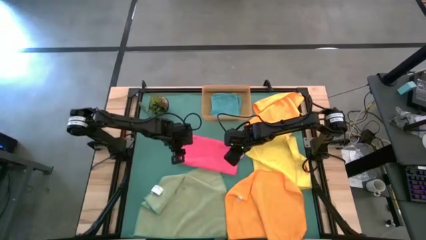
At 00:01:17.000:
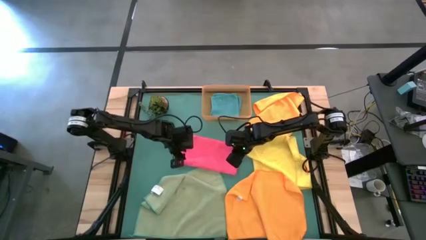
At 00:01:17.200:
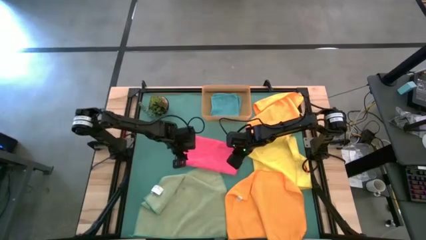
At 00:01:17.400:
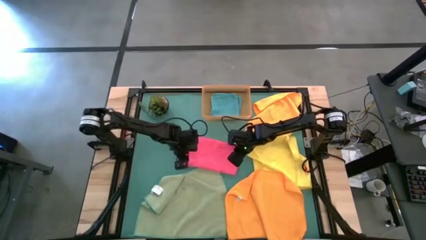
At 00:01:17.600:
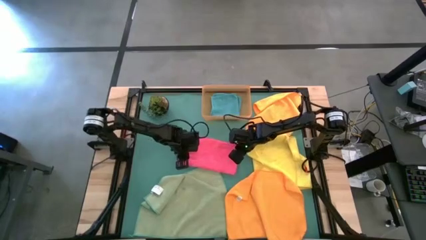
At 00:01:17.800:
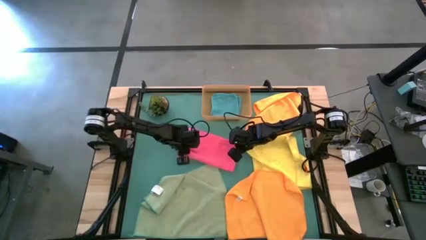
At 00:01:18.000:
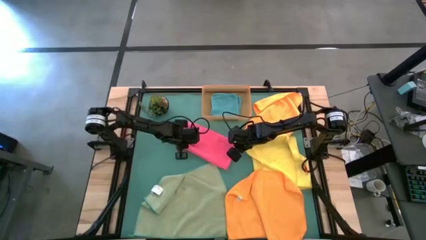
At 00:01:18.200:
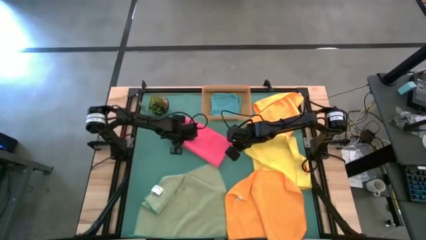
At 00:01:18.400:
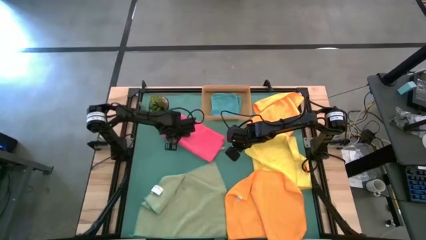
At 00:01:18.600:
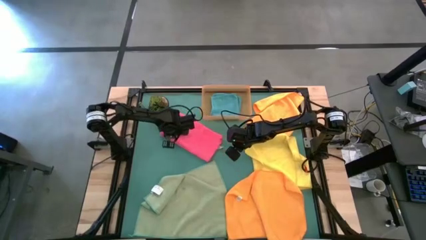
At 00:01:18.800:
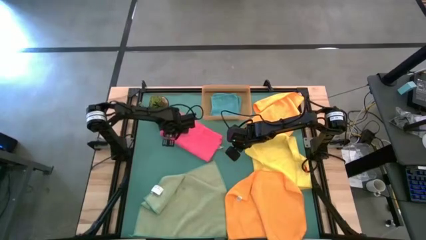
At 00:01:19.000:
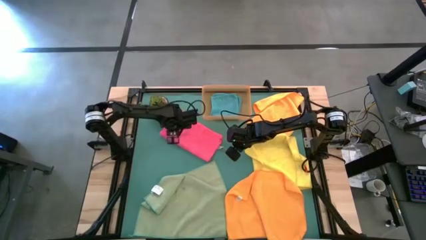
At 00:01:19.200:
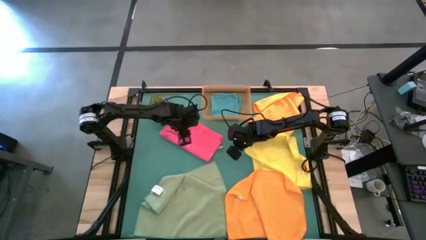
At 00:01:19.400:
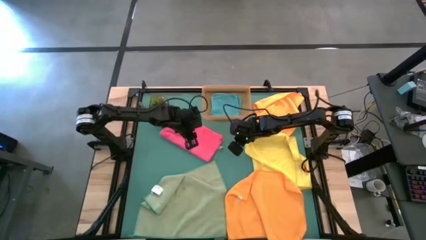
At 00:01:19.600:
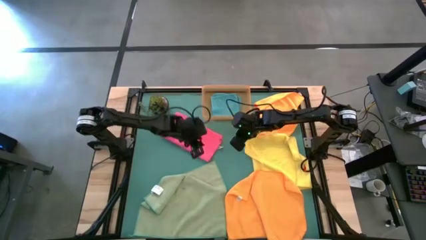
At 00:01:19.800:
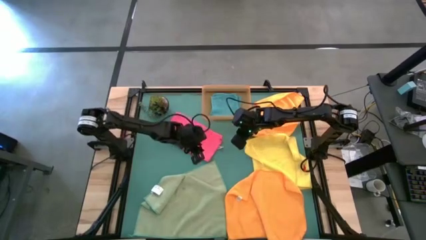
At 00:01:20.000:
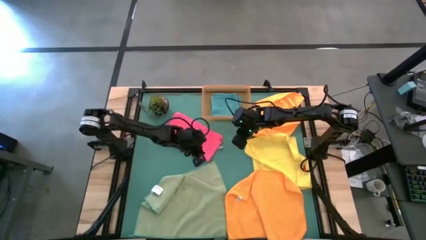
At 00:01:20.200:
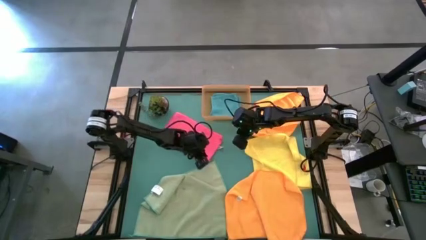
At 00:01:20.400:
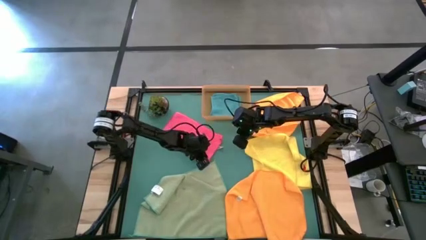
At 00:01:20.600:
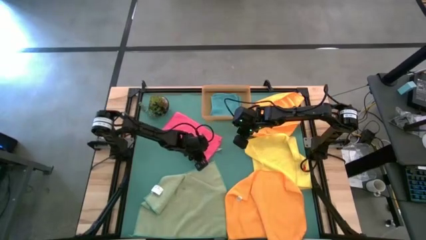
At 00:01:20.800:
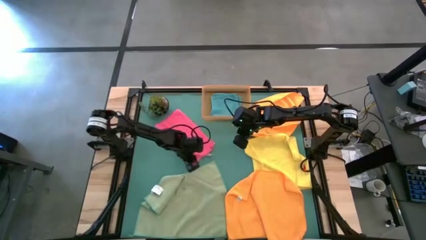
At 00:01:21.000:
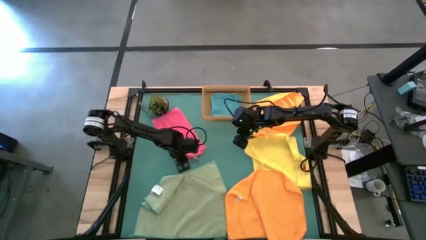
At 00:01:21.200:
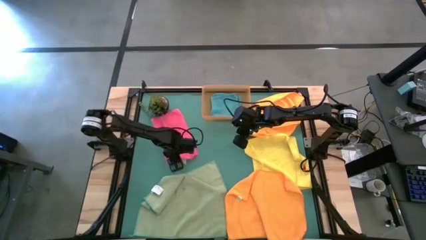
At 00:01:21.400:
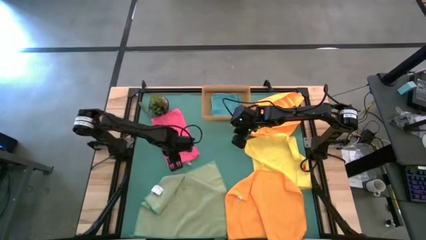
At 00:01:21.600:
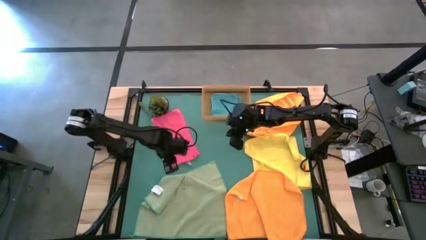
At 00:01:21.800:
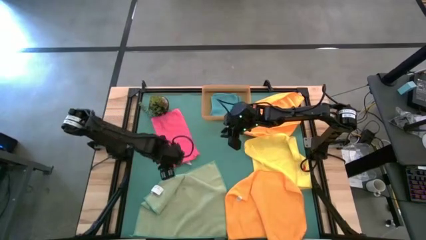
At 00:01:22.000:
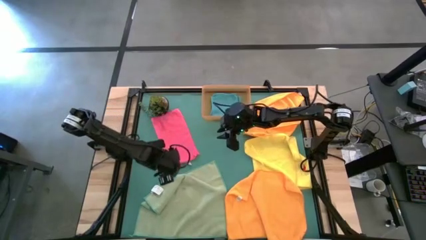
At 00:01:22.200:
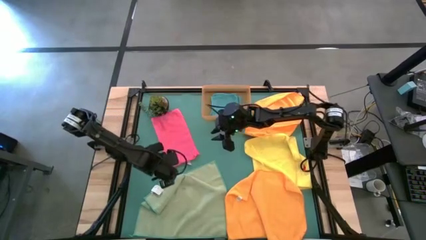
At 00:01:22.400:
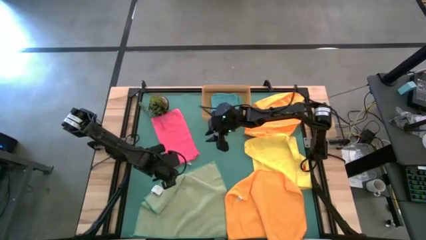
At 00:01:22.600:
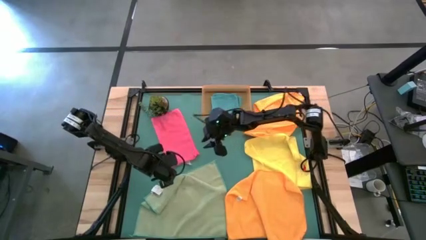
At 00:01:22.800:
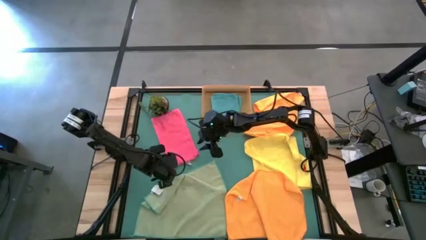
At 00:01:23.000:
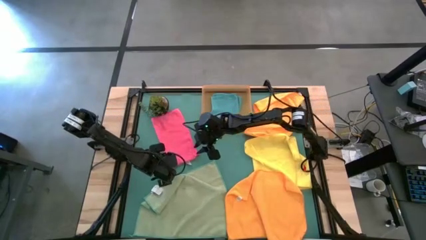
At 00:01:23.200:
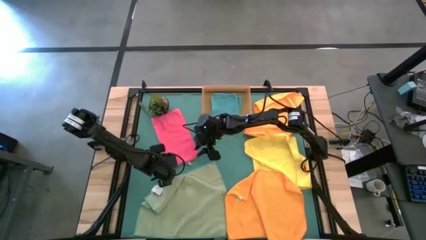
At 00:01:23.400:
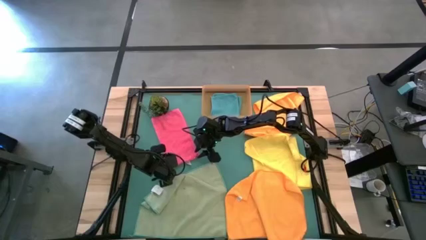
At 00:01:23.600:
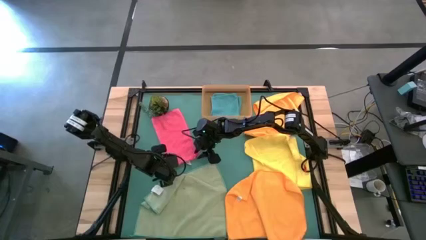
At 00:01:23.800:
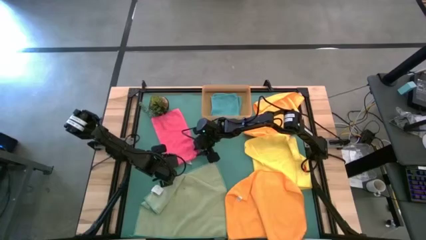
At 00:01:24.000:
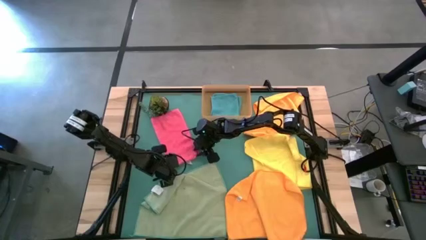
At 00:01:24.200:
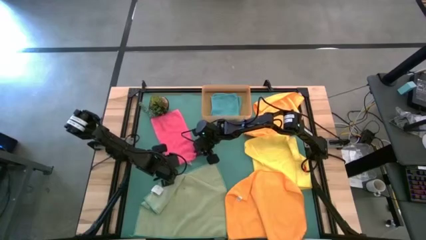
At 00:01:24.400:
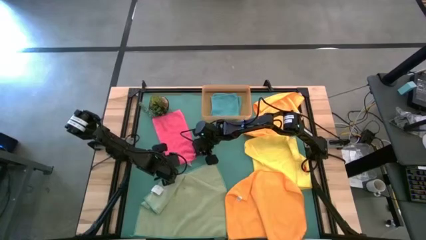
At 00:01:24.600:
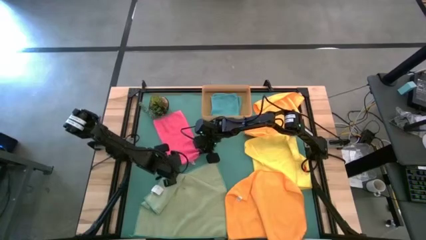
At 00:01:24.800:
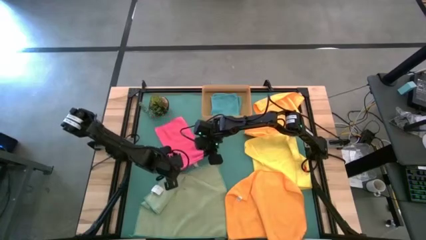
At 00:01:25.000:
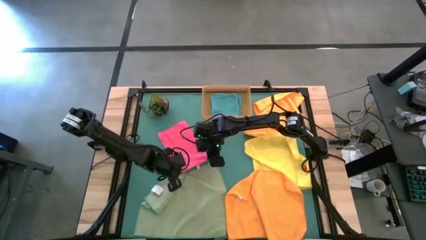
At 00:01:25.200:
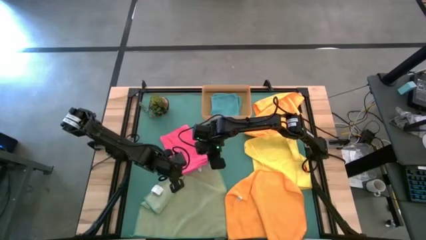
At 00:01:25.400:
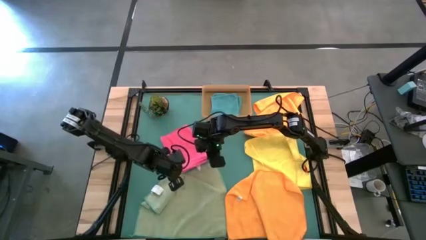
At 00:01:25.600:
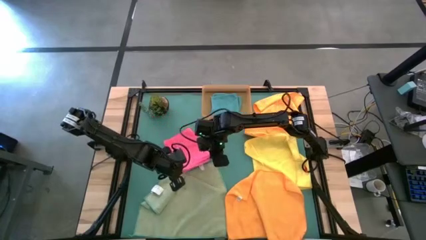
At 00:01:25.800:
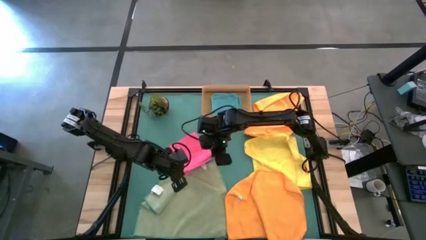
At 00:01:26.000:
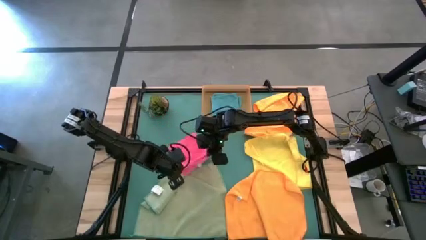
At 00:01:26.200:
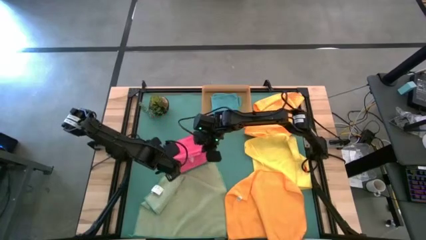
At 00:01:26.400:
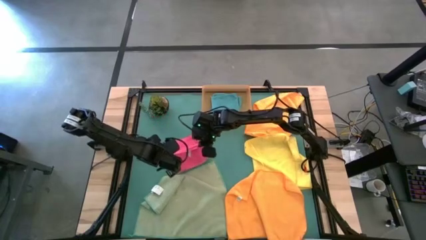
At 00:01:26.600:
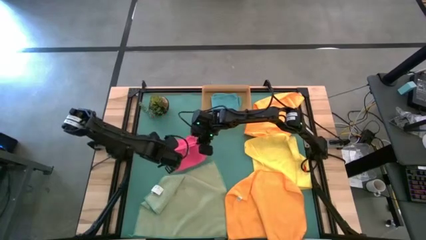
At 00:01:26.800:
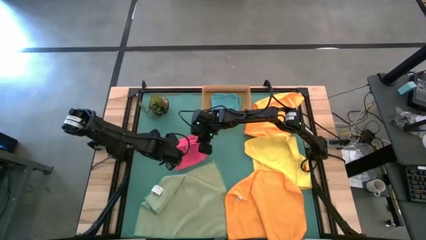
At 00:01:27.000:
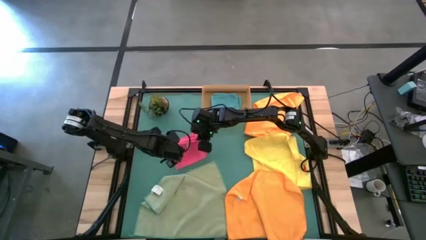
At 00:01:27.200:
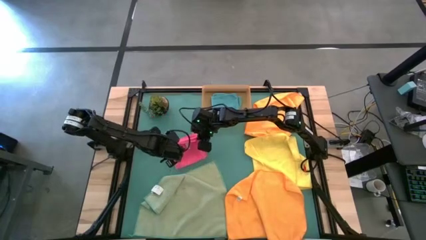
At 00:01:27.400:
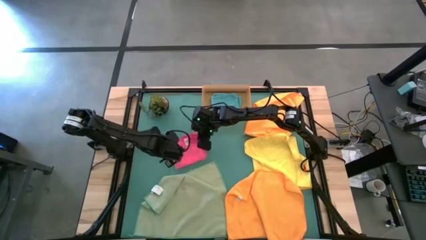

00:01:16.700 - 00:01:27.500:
Task: Fold microfiber towels
Fold the pink microfiber towel
